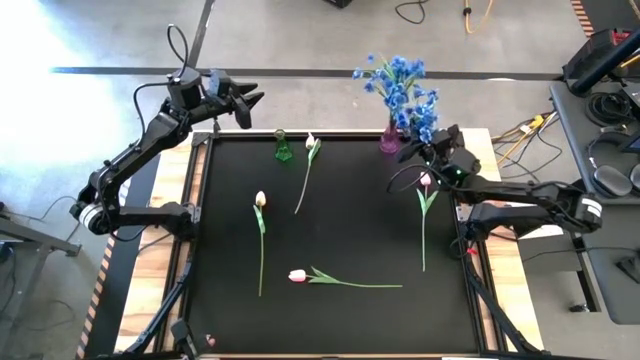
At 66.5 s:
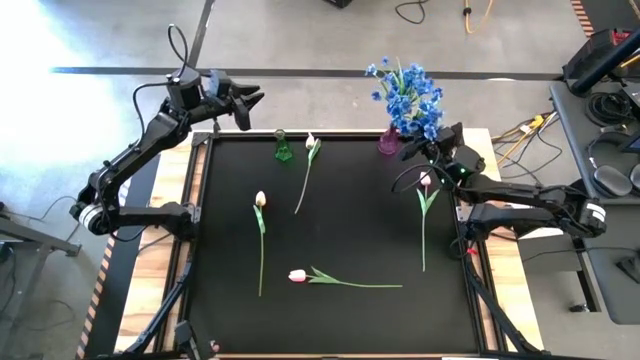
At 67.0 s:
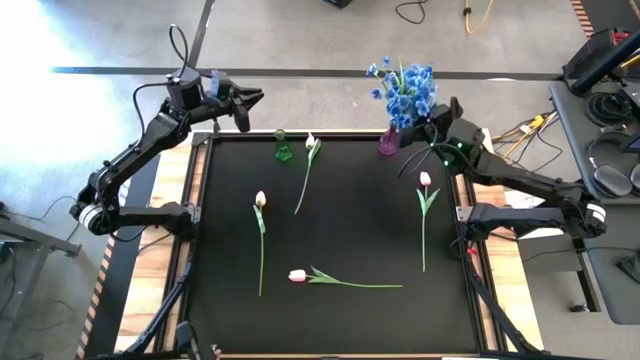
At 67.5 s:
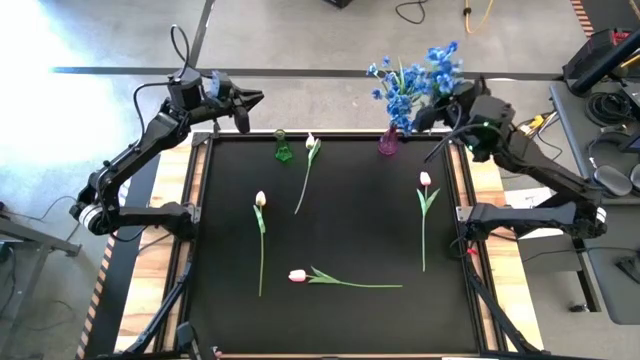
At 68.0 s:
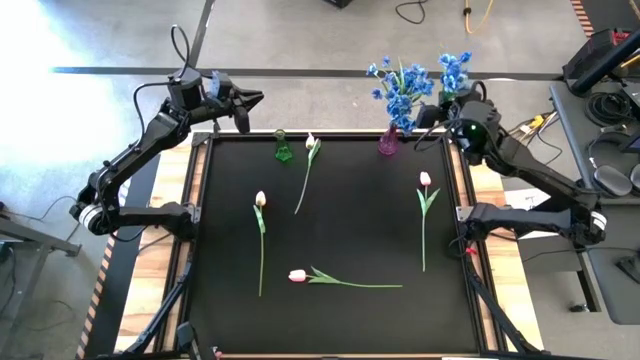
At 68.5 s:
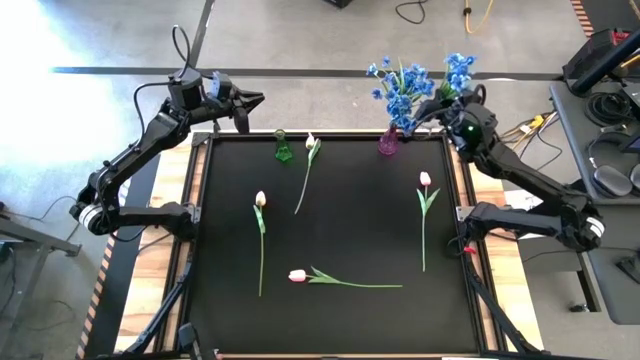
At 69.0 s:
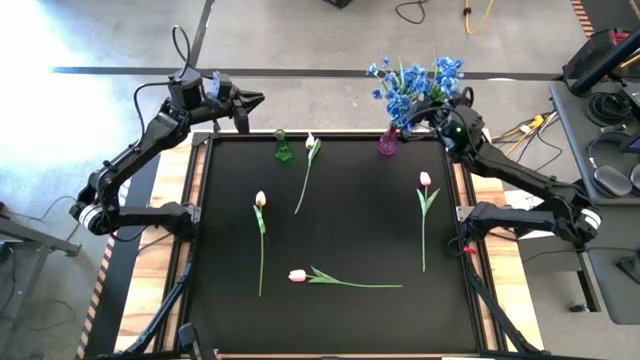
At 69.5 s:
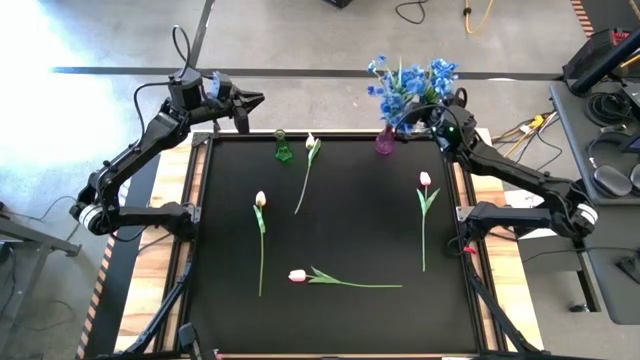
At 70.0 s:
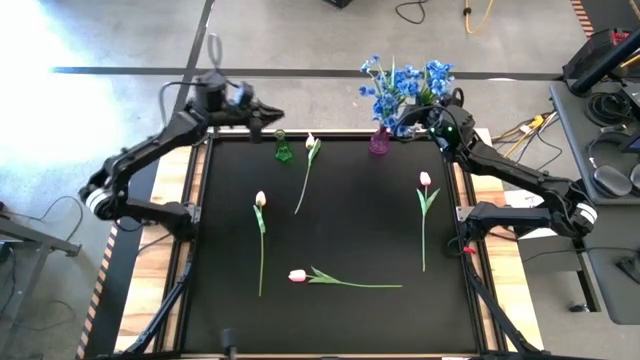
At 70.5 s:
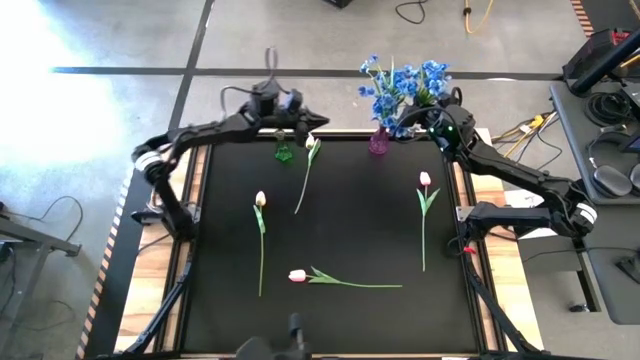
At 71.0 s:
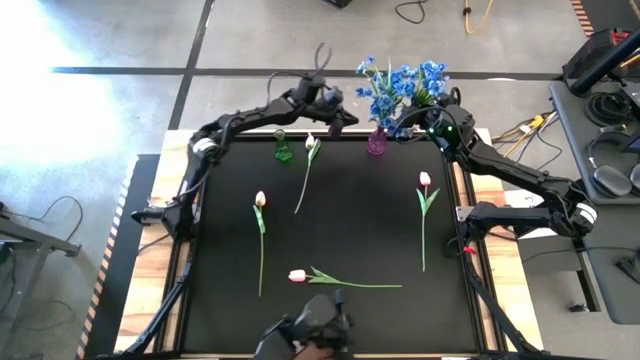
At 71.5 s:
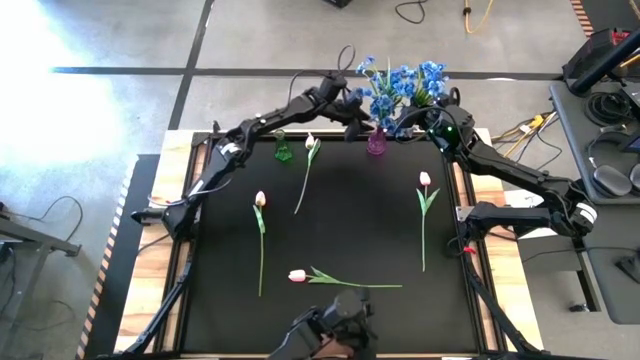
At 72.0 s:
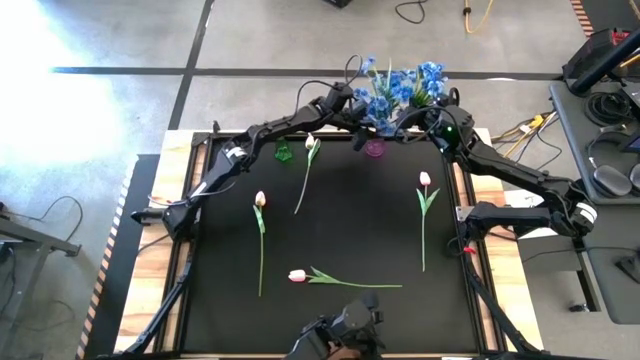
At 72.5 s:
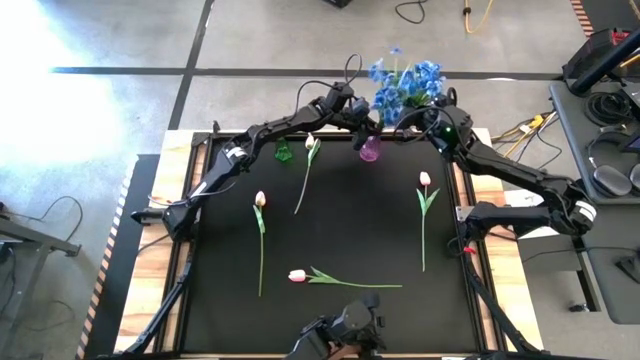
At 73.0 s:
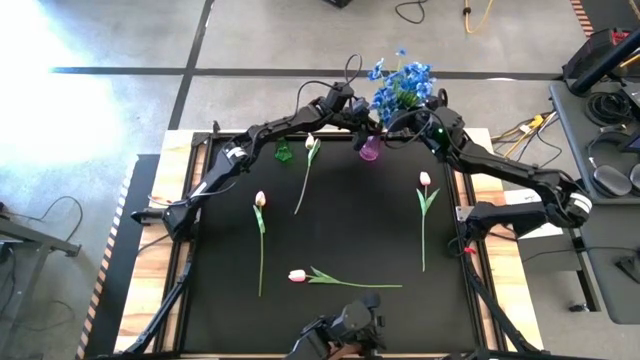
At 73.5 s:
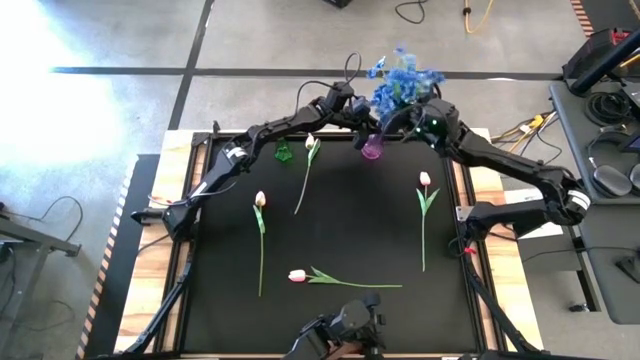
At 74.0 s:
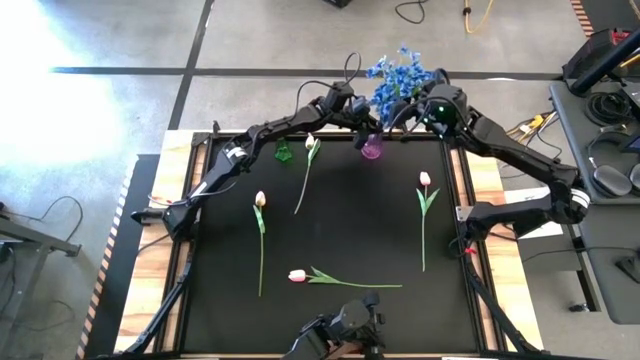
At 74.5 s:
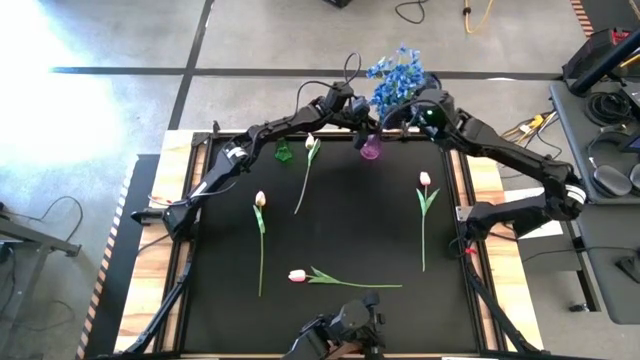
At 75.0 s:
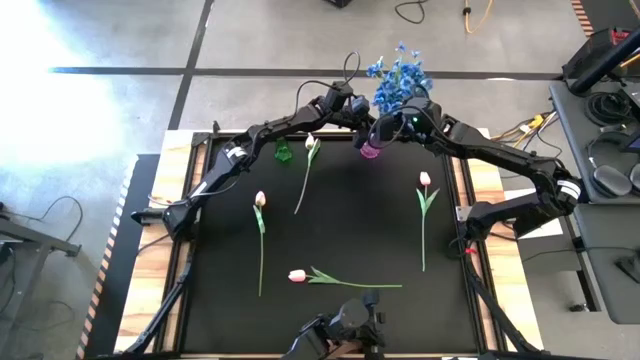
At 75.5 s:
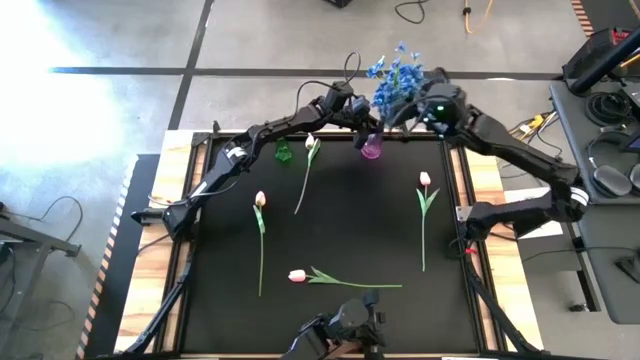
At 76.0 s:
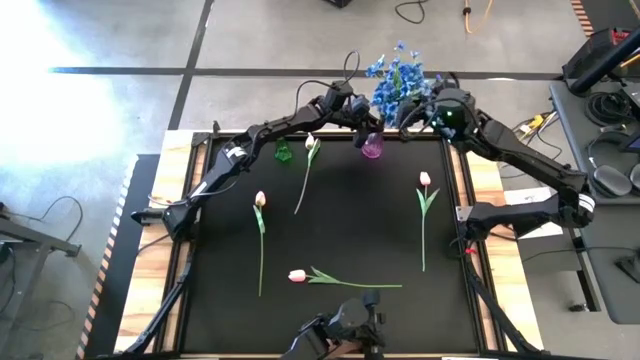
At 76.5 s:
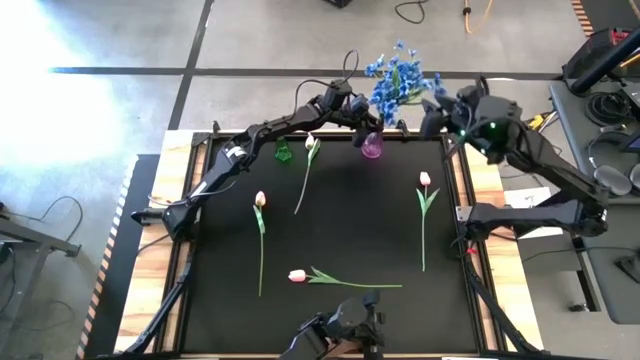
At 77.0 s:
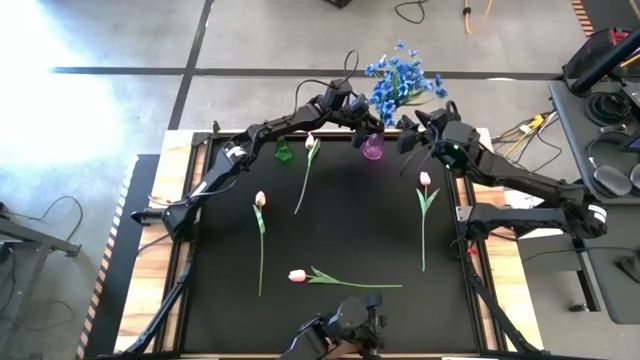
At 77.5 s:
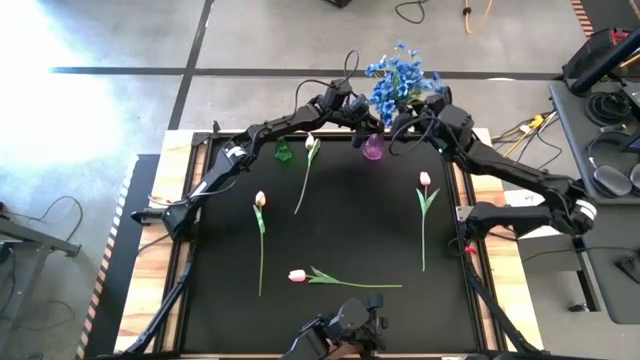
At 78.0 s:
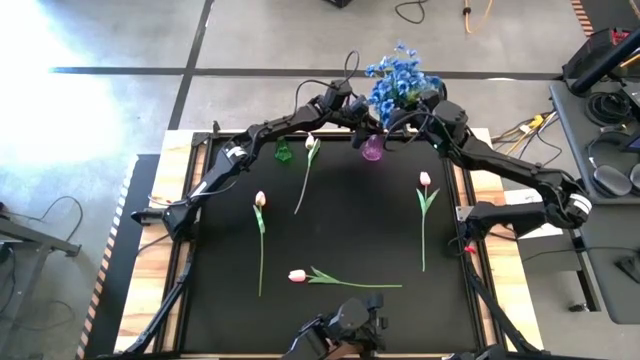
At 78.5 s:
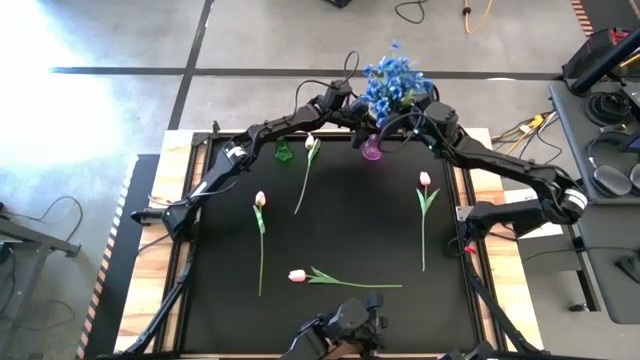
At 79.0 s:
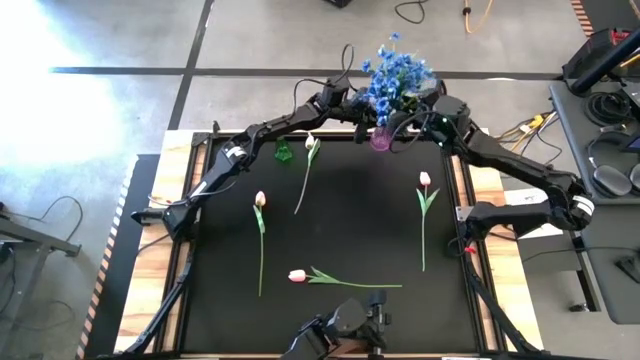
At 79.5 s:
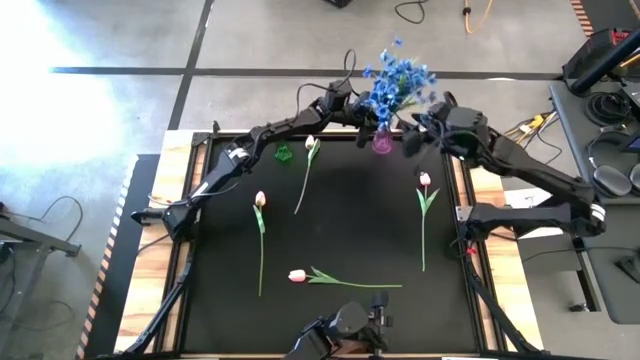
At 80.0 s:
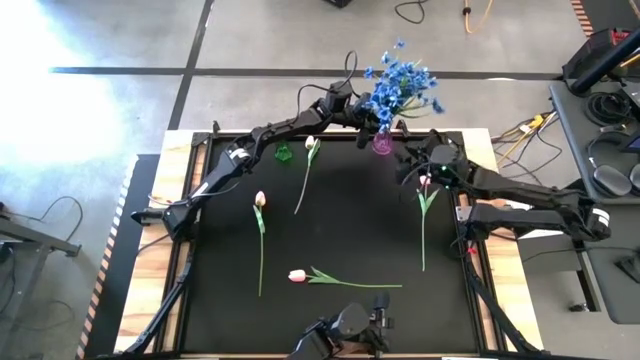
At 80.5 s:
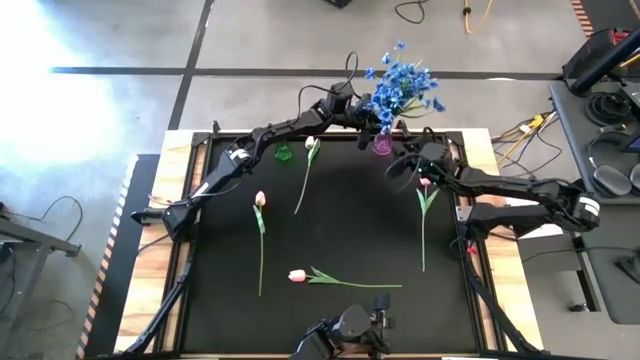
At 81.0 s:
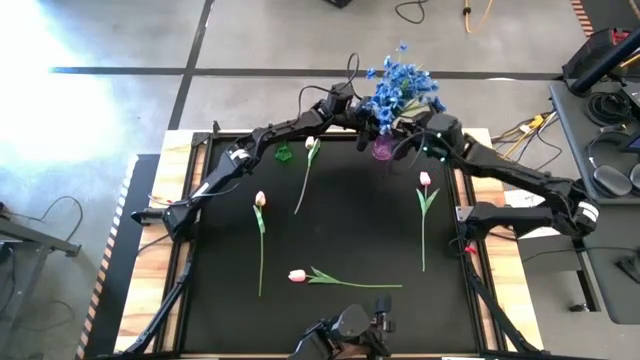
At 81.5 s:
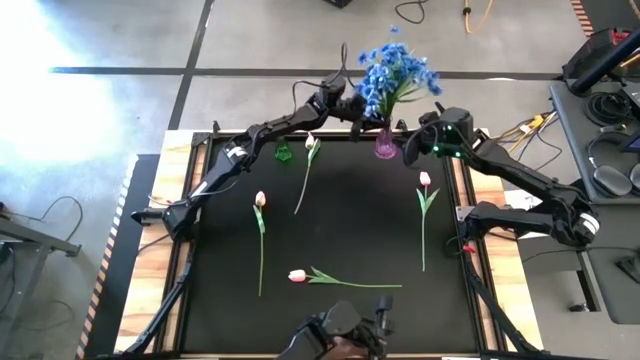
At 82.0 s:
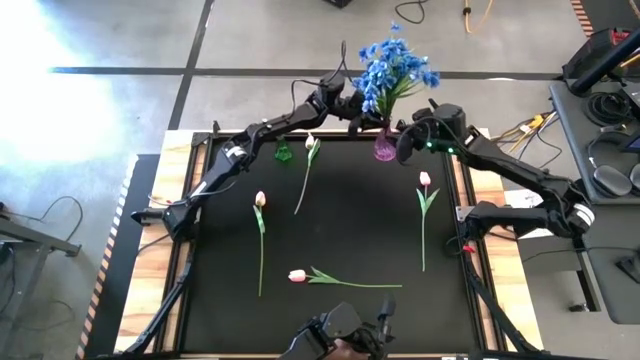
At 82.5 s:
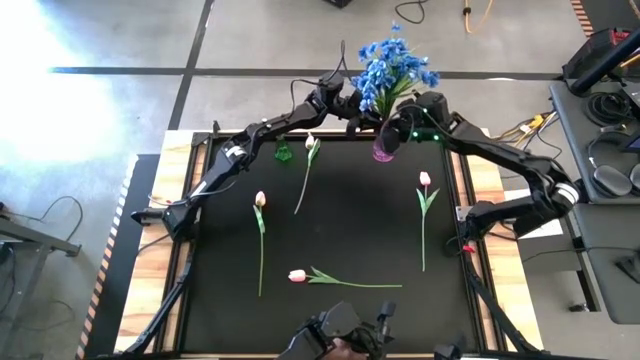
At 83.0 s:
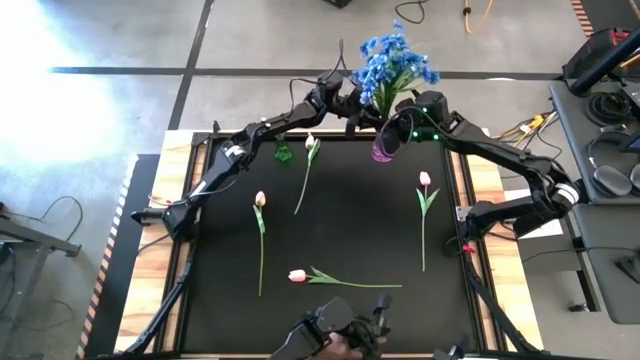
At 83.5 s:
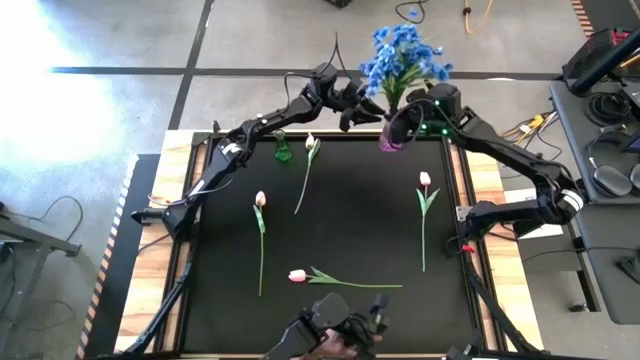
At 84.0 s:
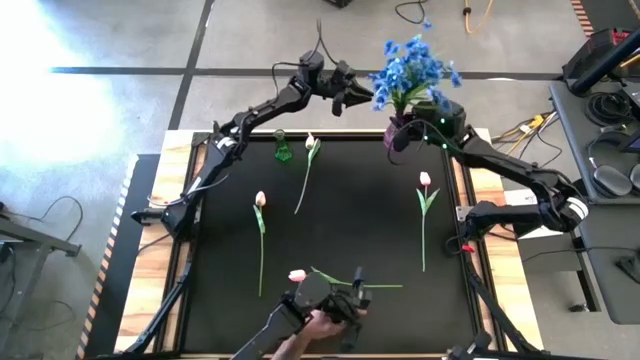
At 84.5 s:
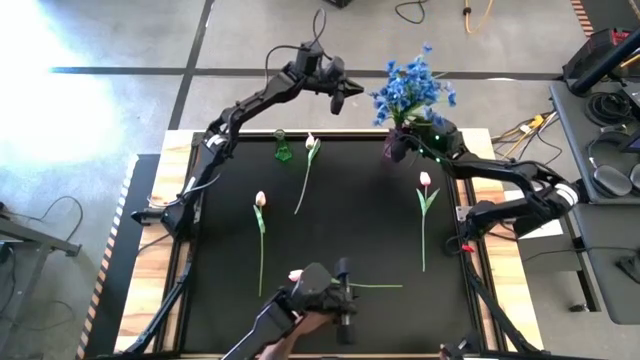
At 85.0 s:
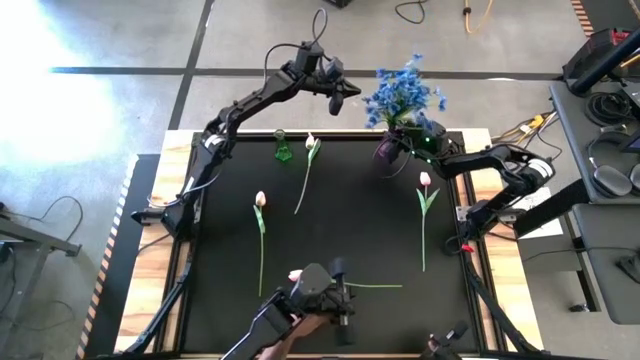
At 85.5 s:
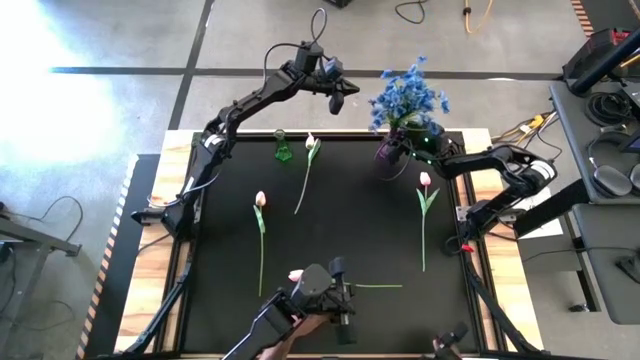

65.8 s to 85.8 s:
Task: Sort flowers into vase by color
Put the blue flowers into the violet vase
